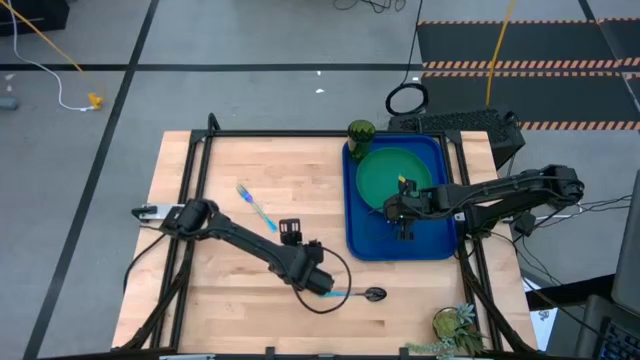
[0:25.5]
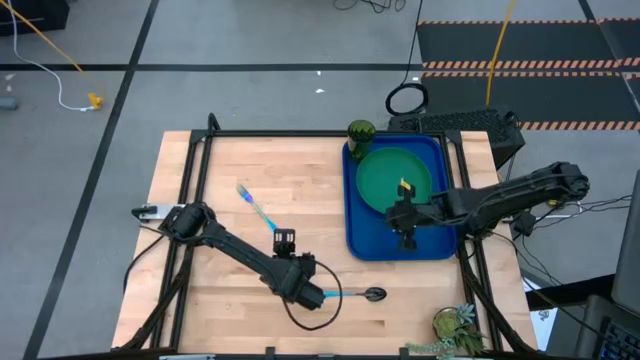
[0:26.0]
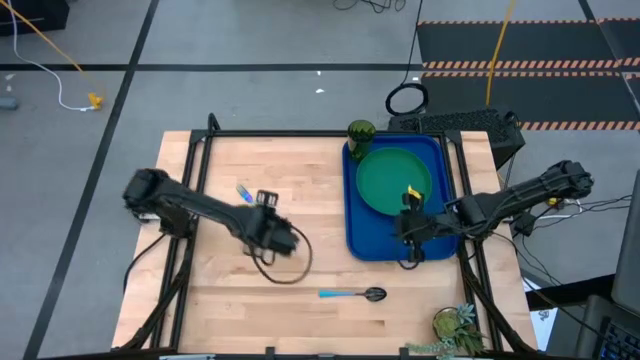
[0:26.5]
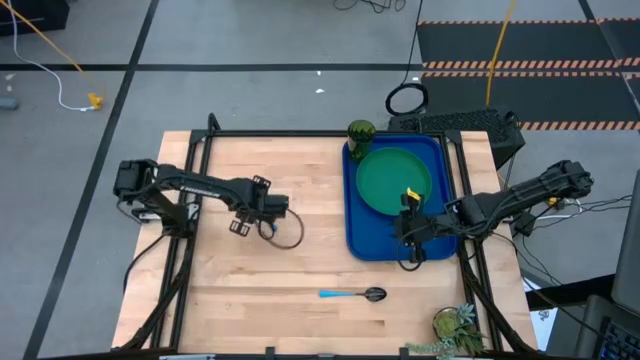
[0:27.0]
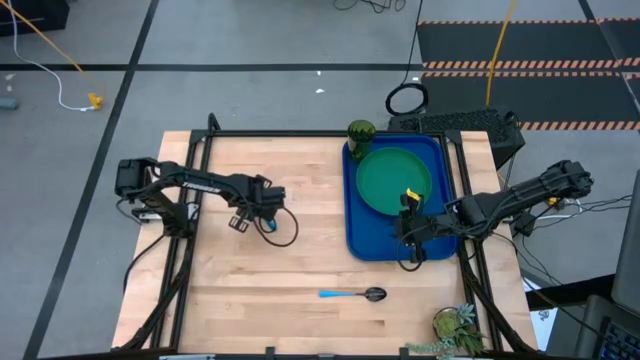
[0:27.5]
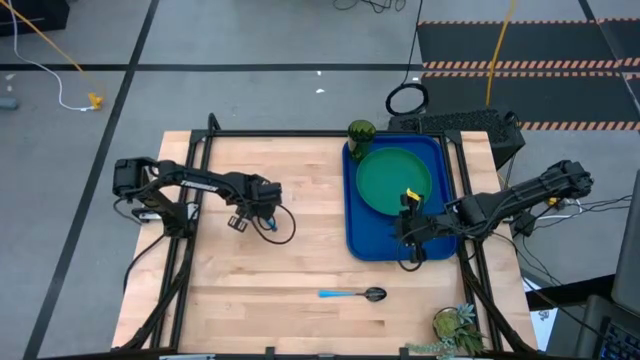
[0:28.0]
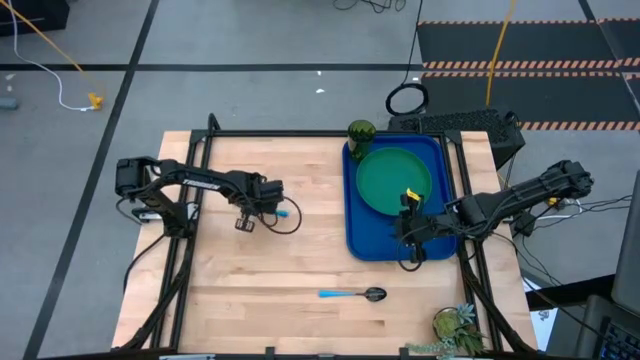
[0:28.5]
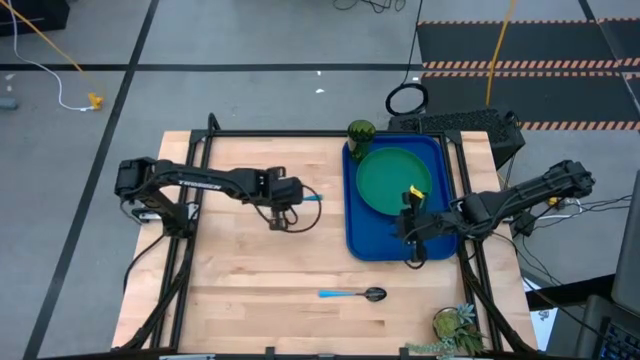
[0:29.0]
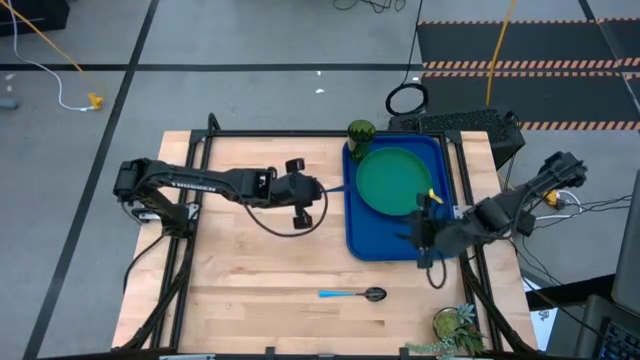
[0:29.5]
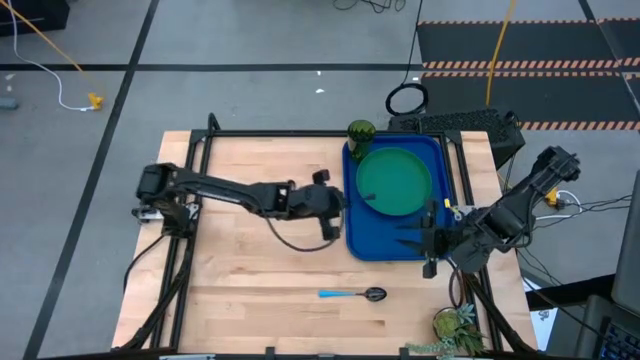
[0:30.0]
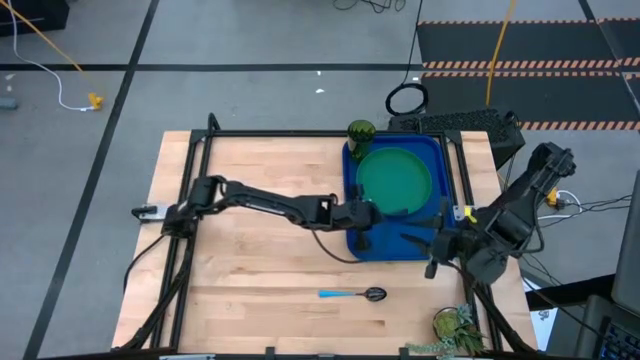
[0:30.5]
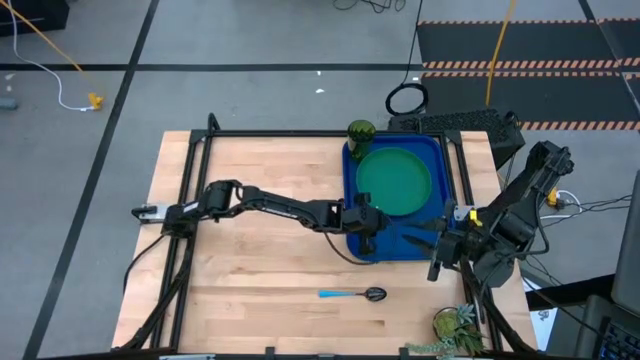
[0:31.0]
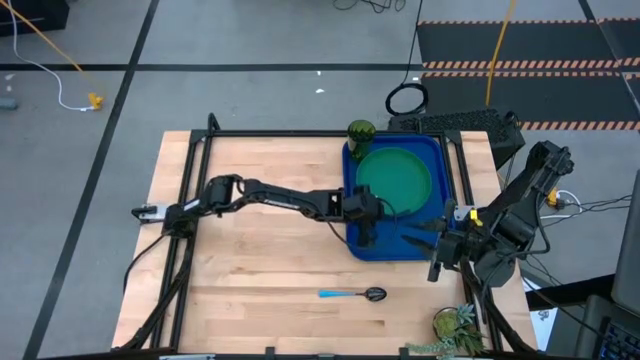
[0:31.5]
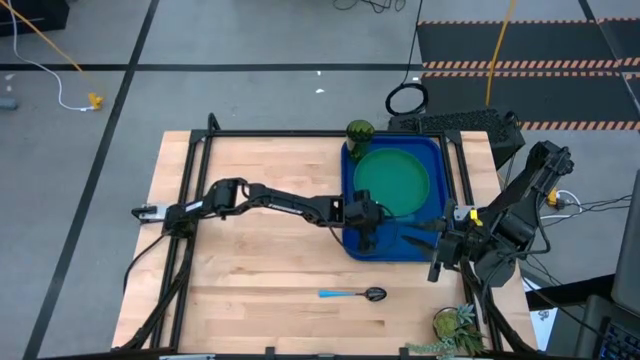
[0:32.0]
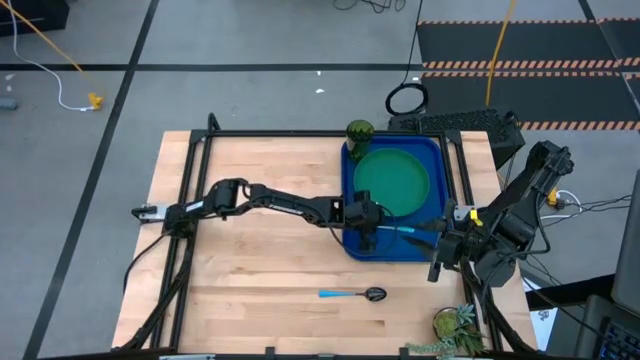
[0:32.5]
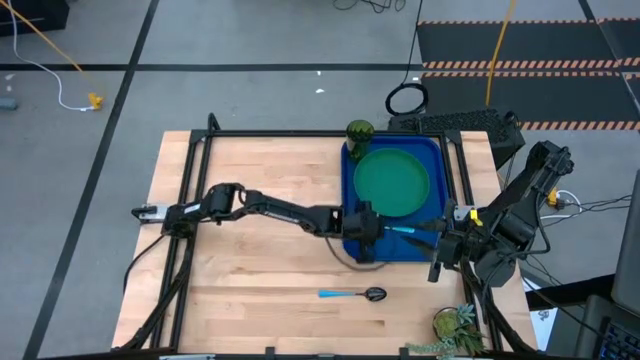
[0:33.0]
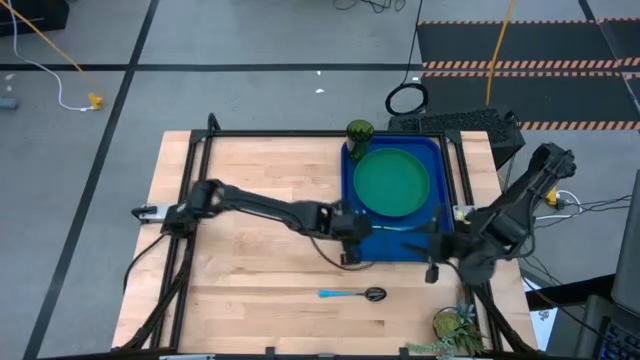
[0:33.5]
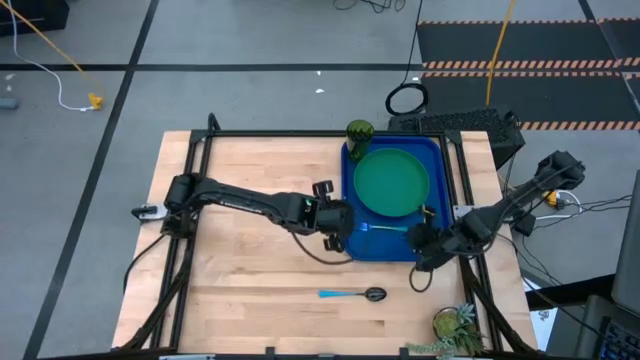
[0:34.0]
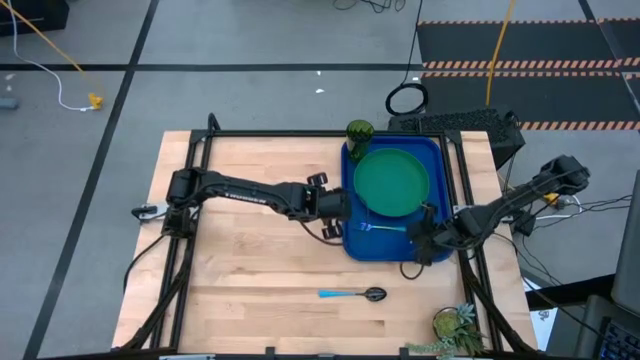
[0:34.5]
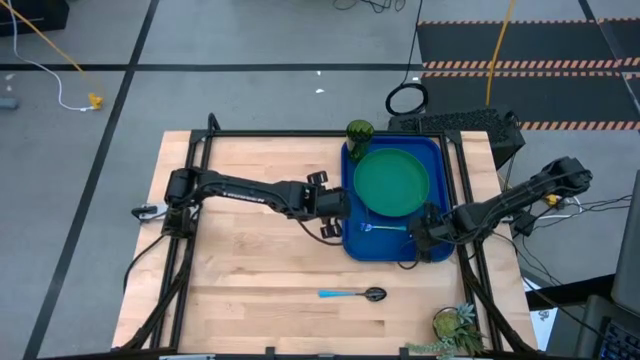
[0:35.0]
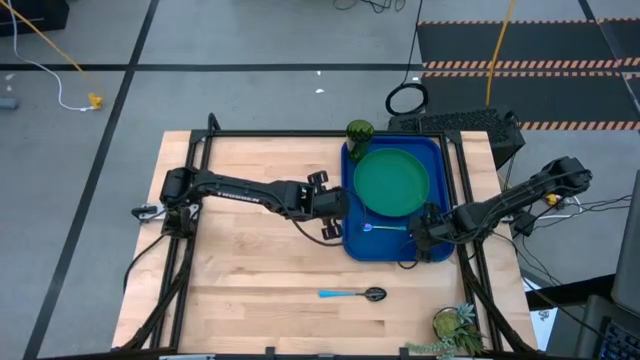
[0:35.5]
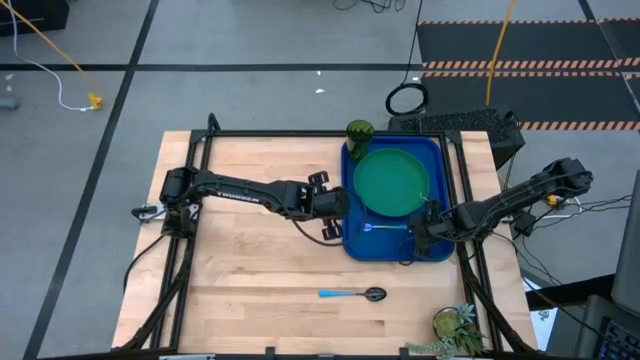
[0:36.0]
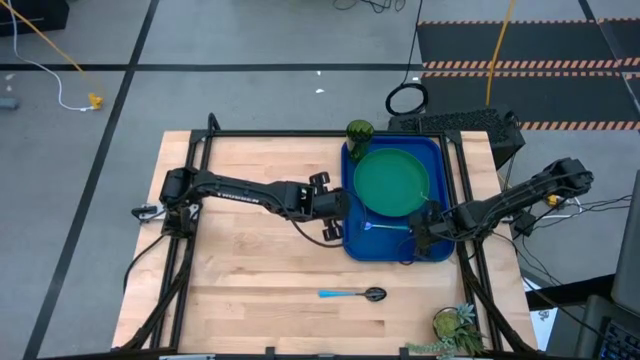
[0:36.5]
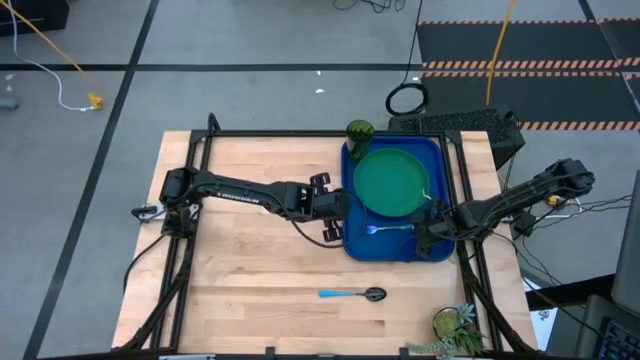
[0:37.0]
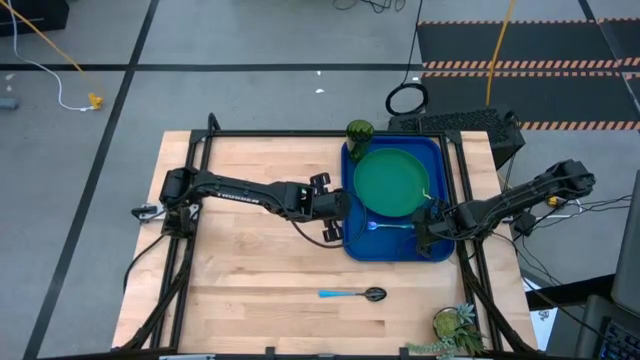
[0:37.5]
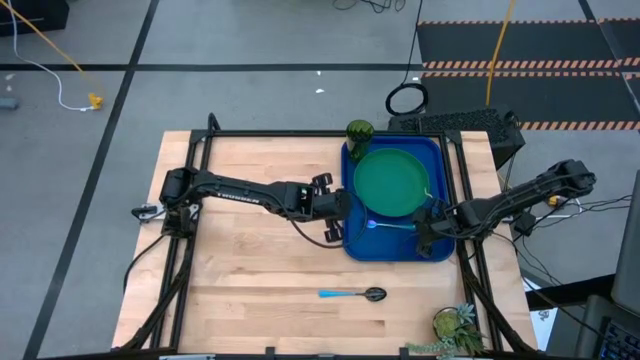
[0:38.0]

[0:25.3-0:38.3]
Task: Pick and place plate/cup/fork/spoon on tray
Put the blue fork on the blue tray to the left of the green cup

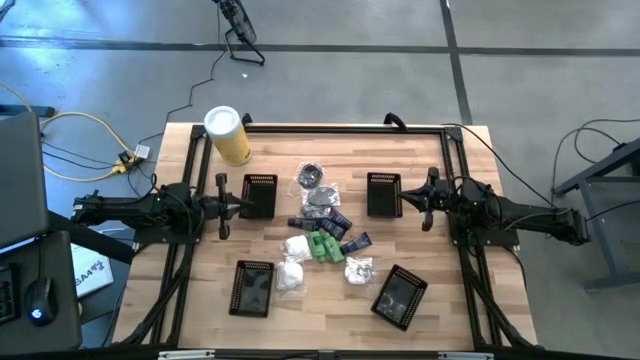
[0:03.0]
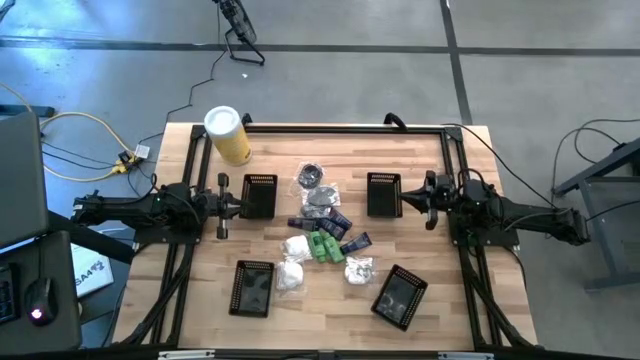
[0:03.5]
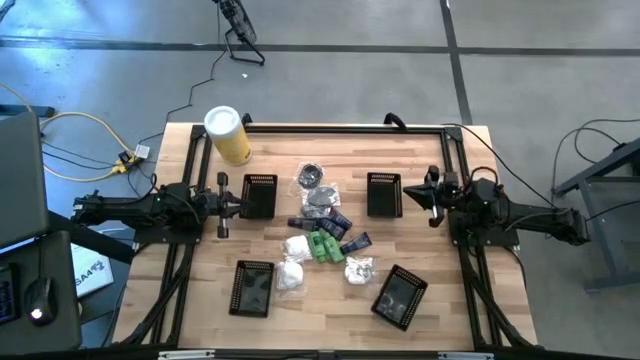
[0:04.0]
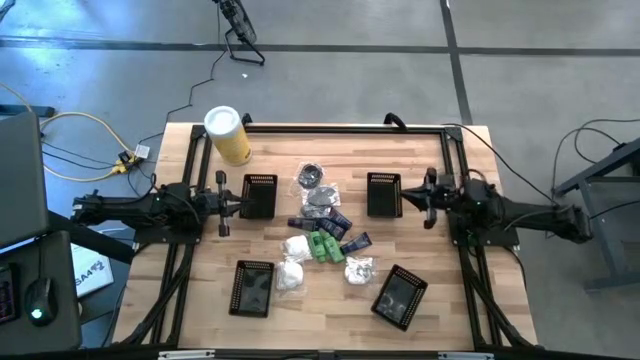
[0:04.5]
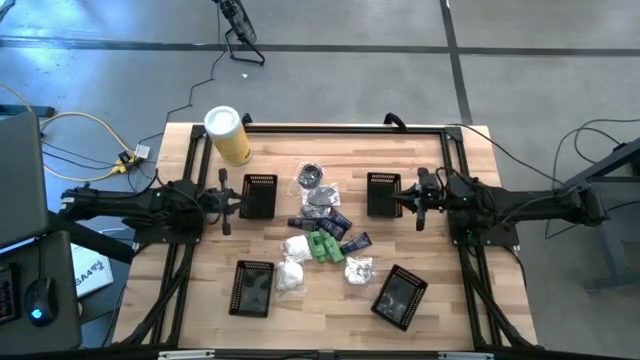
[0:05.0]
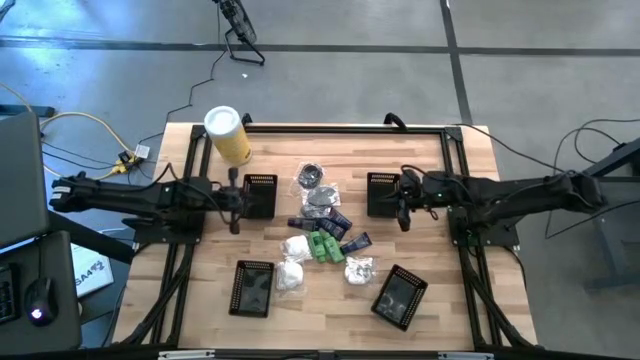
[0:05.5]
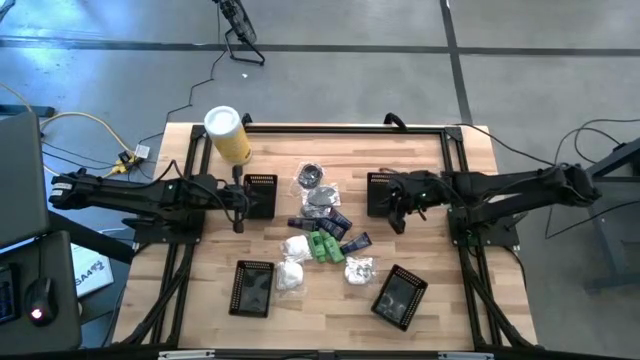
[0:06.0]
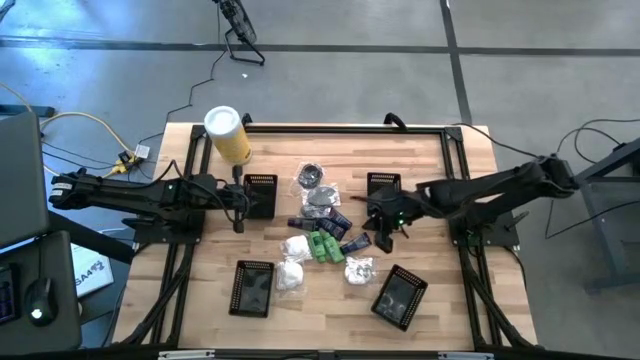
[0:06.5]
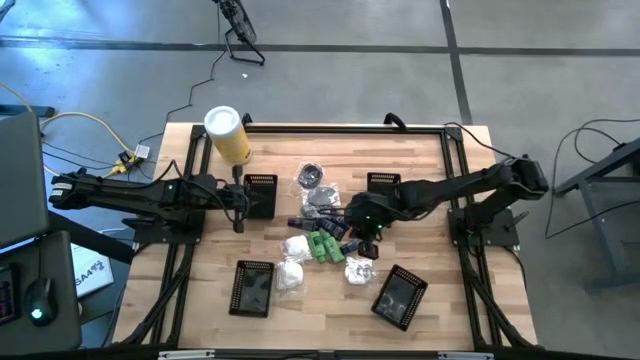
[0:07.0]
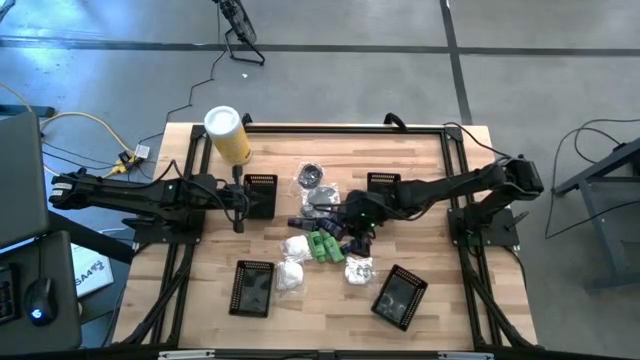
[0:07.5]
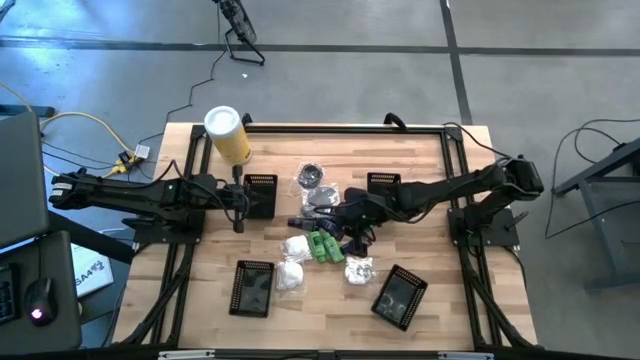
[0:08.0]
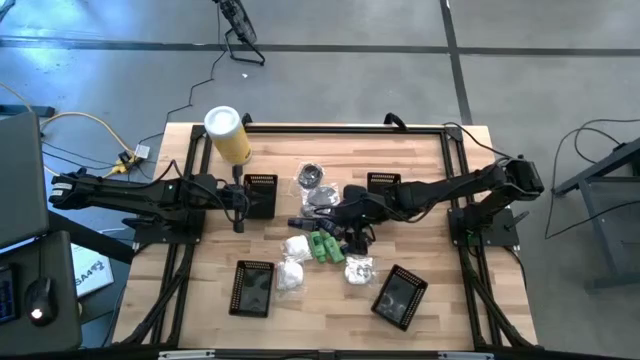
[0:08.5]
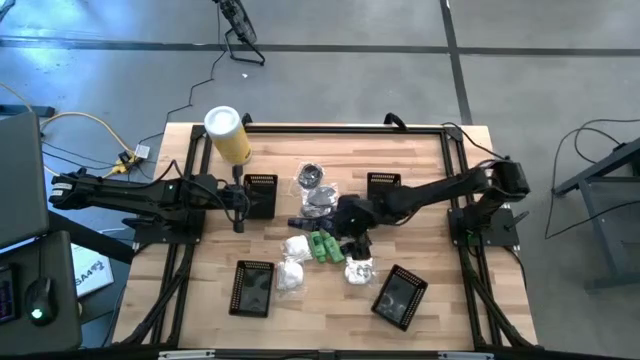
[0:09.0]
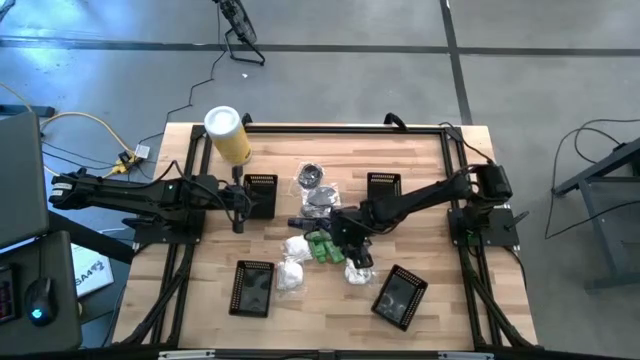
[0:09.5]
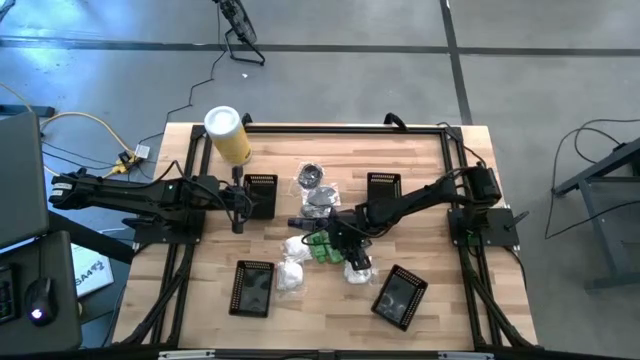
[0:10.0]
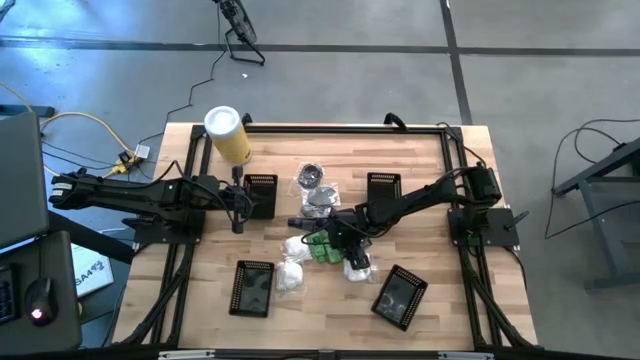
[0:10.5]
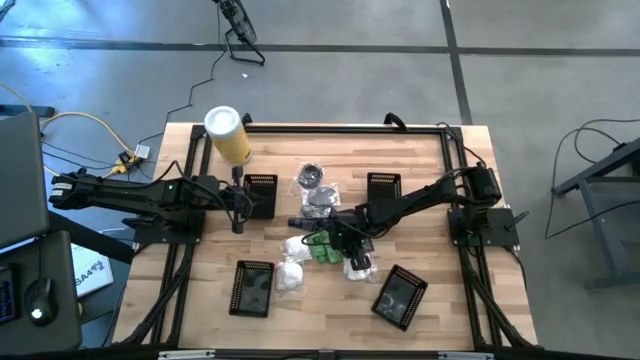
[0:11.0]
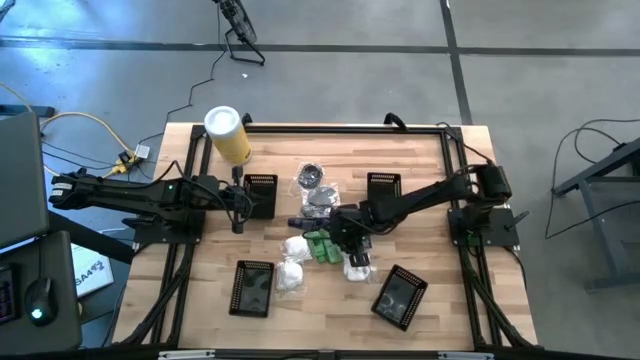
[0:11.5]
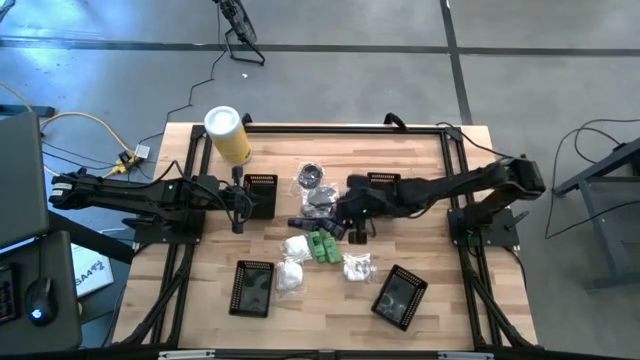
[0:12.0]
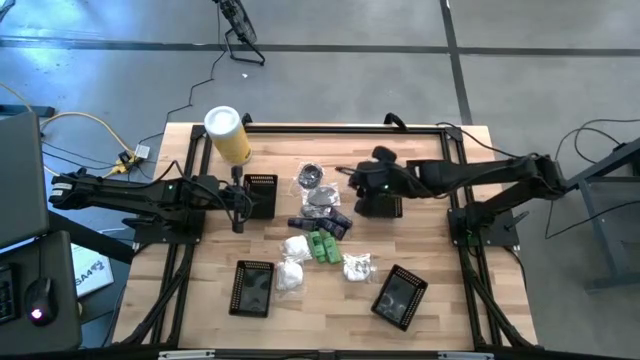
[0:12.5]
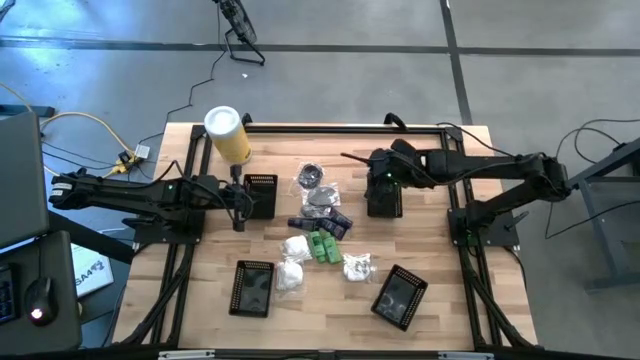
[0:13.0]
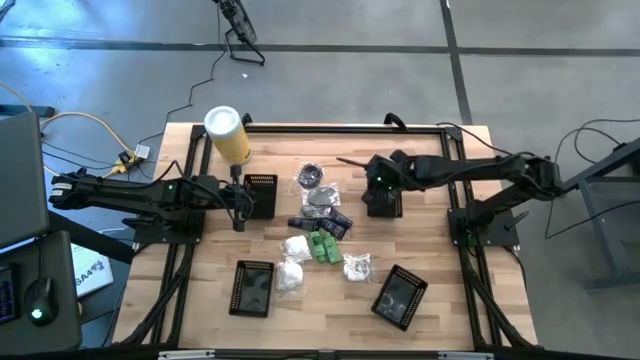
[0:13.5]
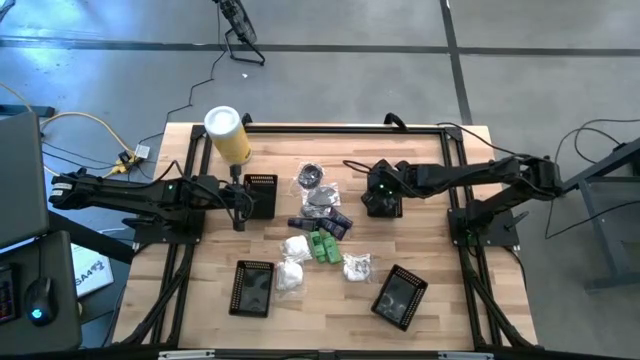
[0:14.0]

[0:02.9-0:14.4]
Task: Pick & Place Travel size toiletries
Put the blue shave cream into the top right black basket
